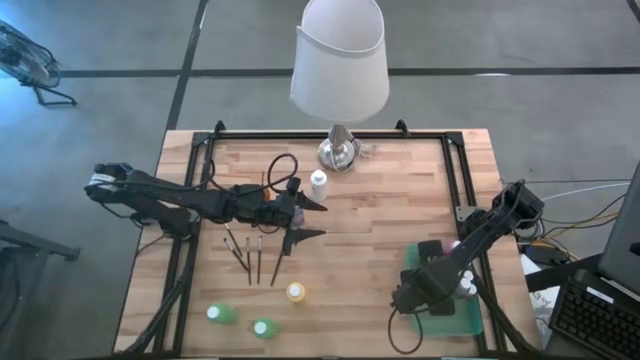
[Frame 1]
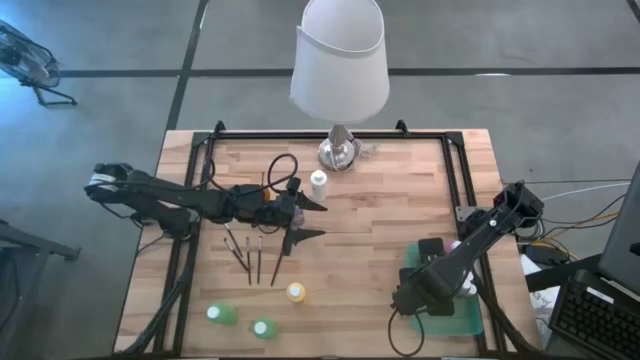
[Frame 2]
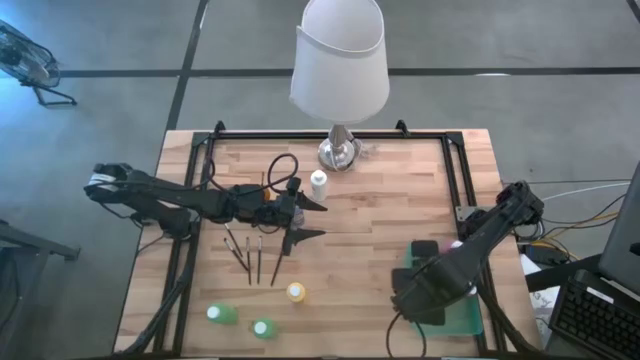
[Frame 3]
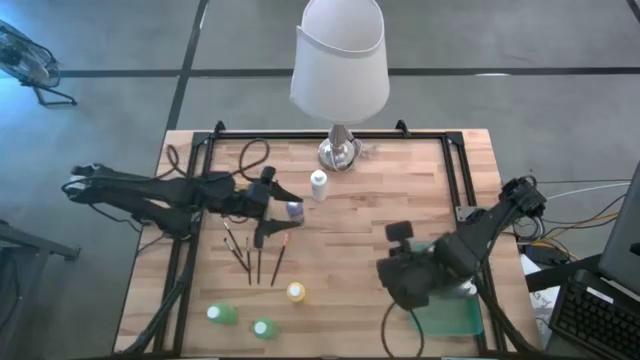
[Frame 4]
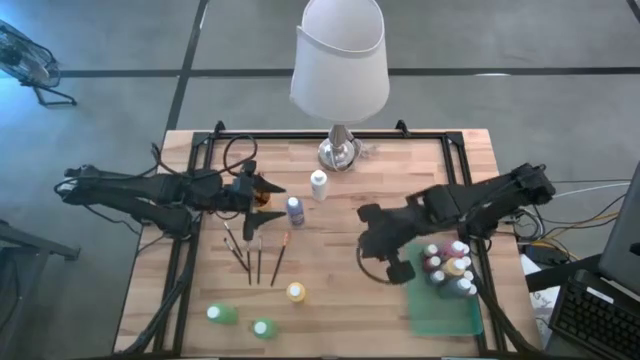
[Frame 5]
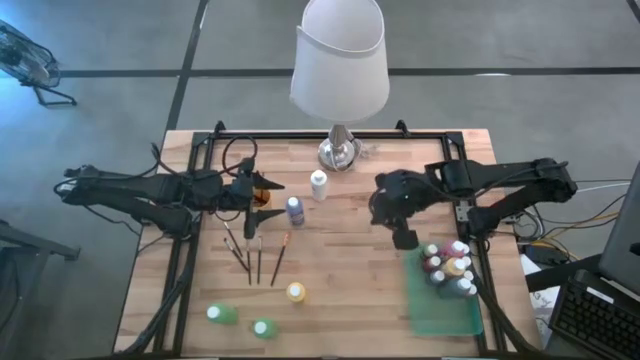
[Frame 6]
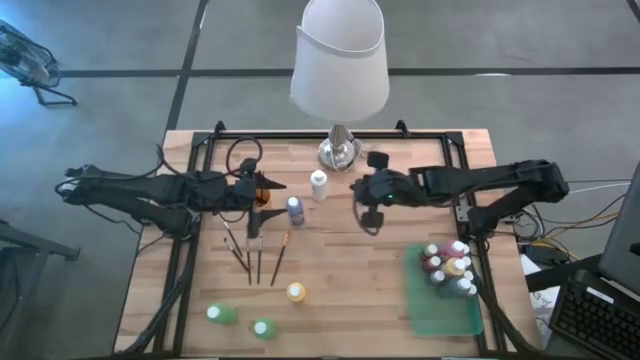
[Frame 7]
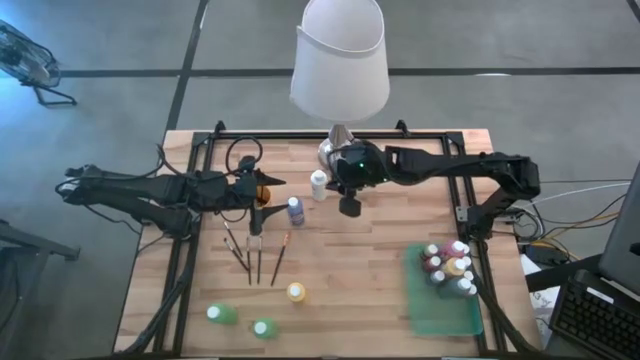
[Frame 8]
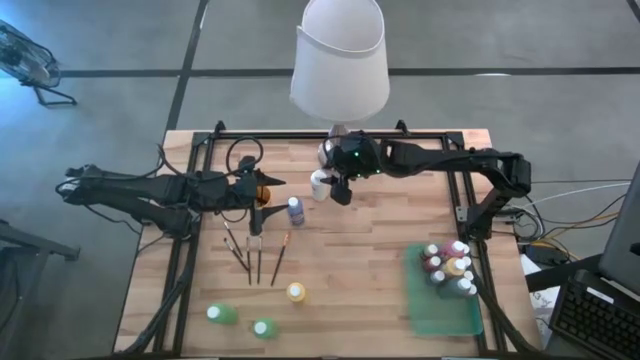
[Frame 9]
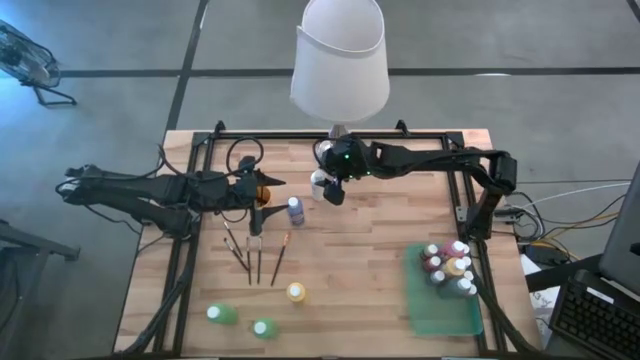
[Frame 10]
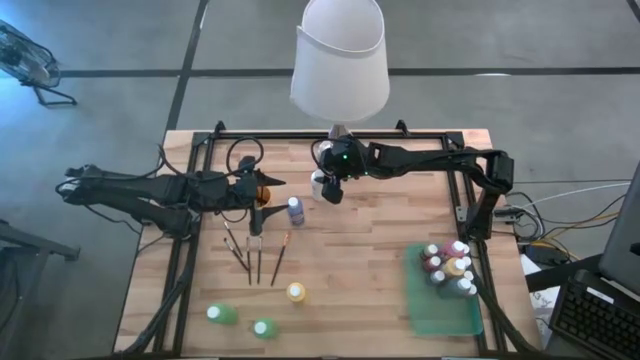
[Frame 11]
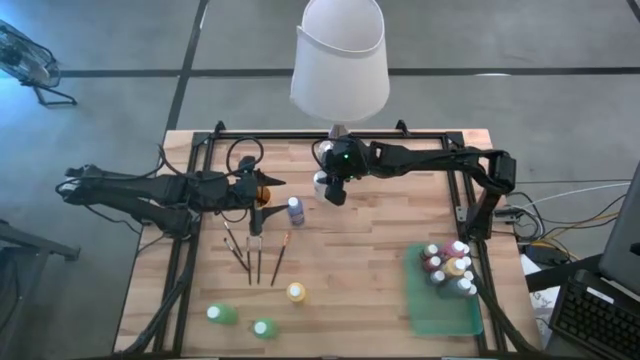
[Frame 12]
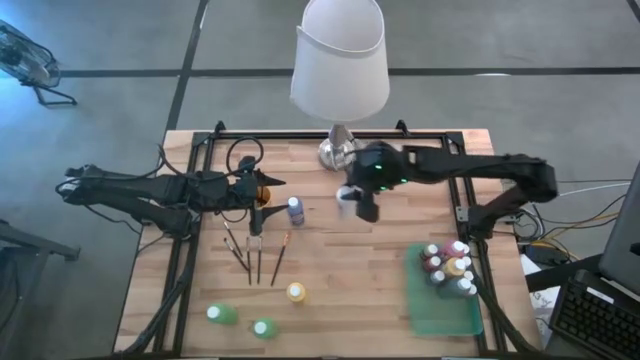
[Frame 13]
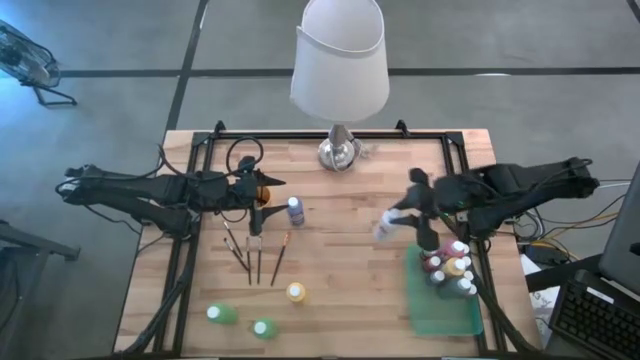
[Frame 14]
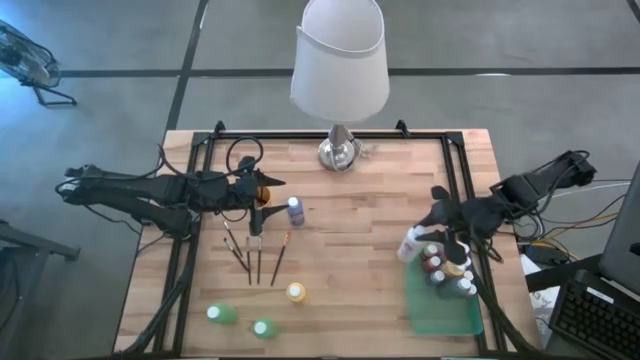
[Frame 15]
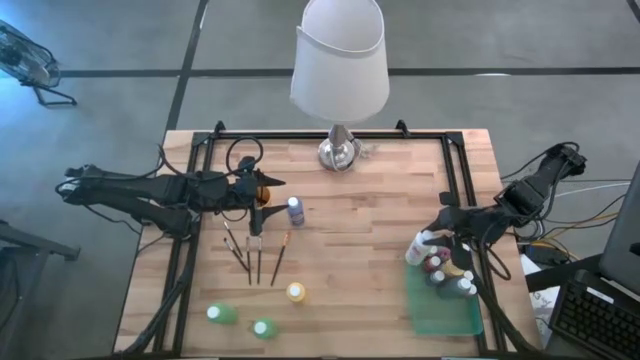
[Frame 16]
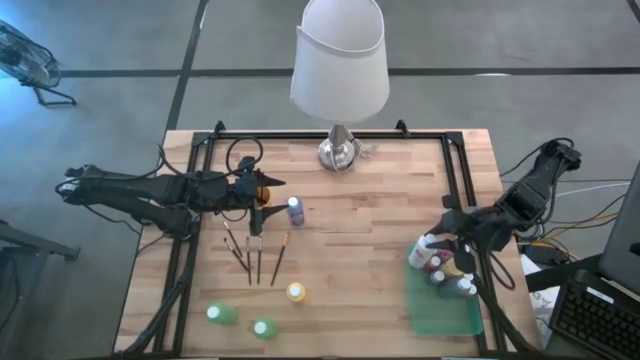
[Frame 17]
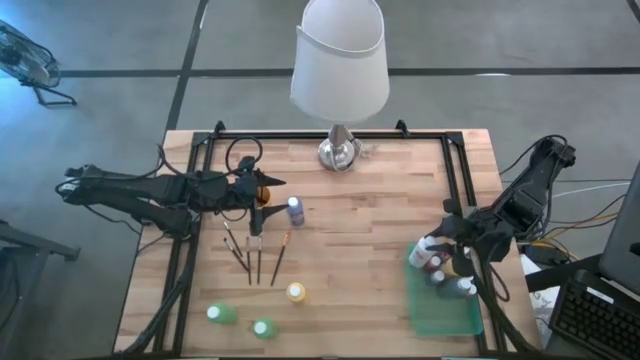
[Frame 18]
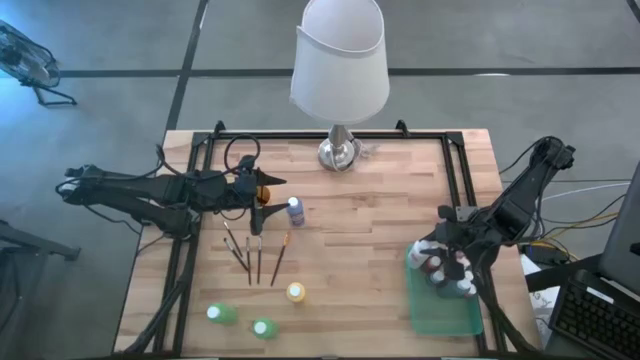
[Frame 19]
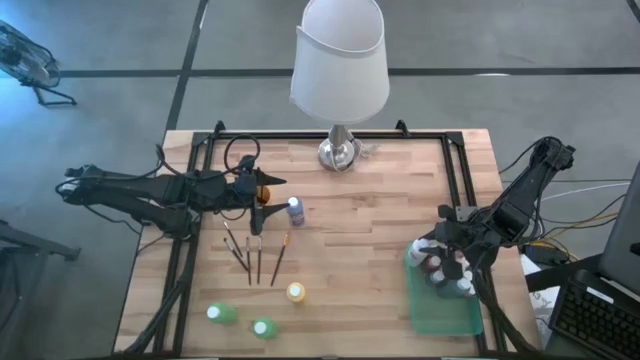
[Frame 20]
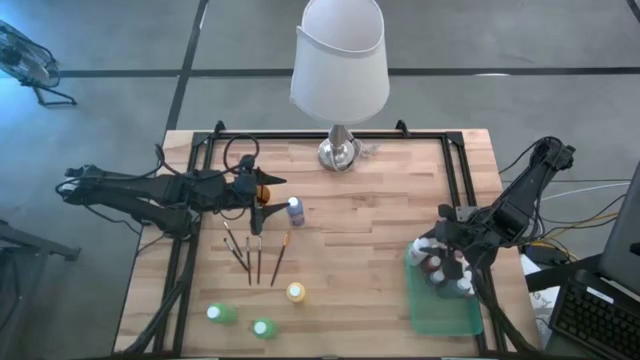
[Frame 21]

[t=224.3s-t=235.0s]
Task: Pick & Place Paint Supplies
Put the white paint bottle into the green bin
